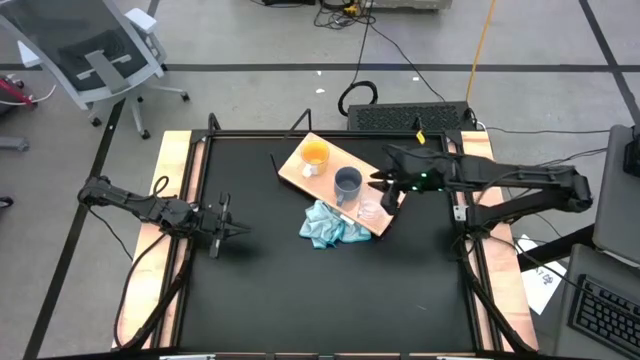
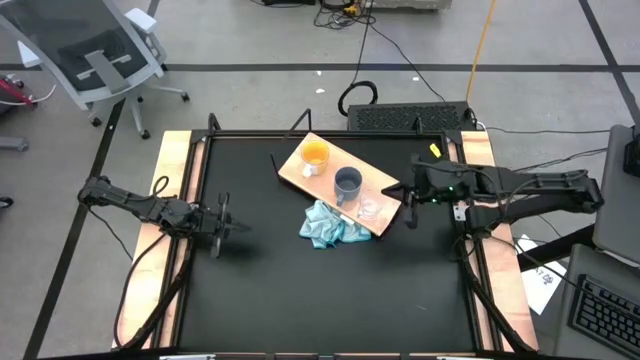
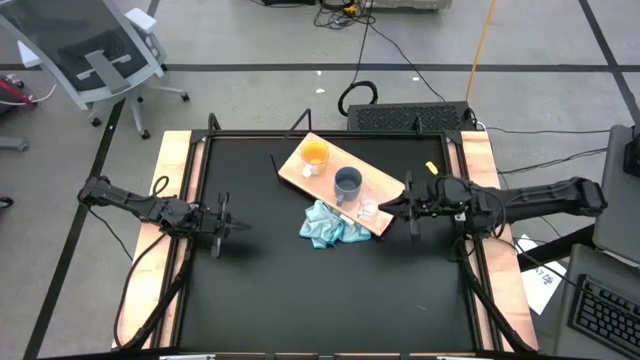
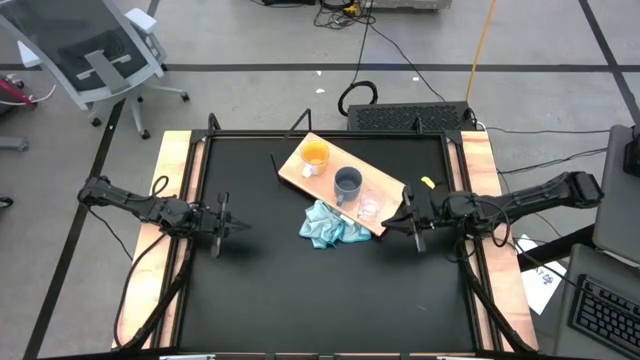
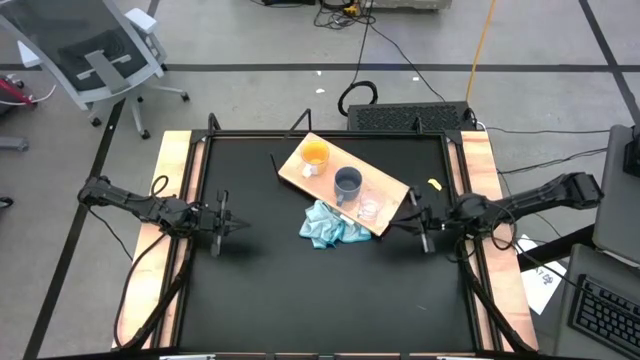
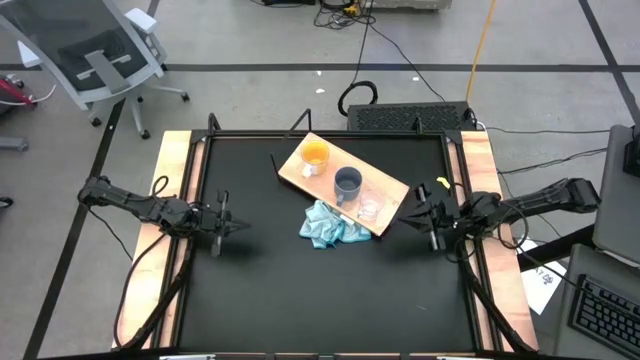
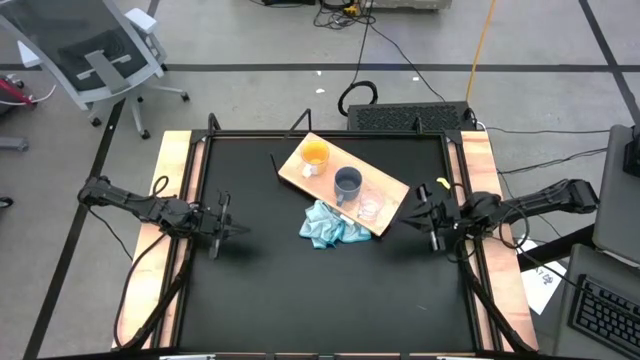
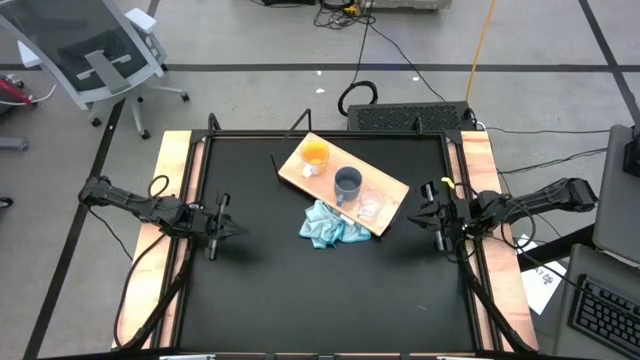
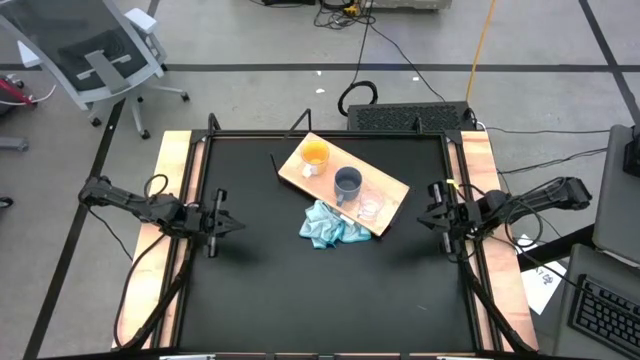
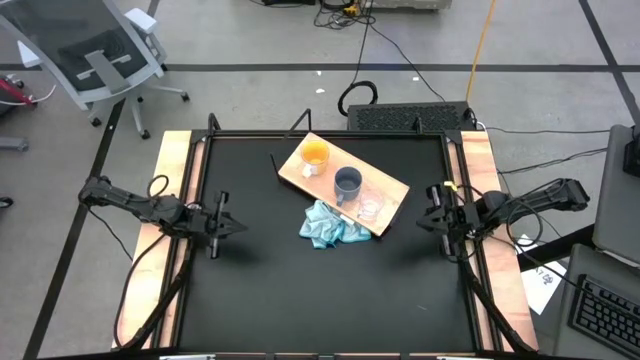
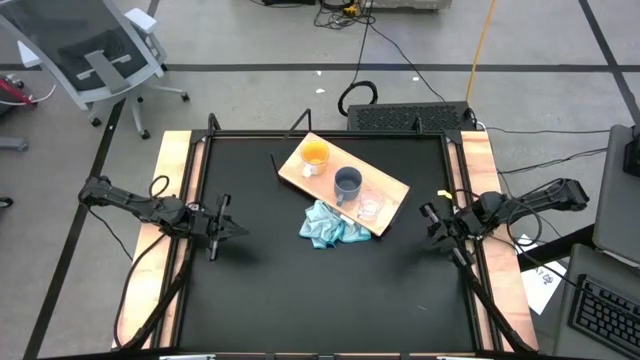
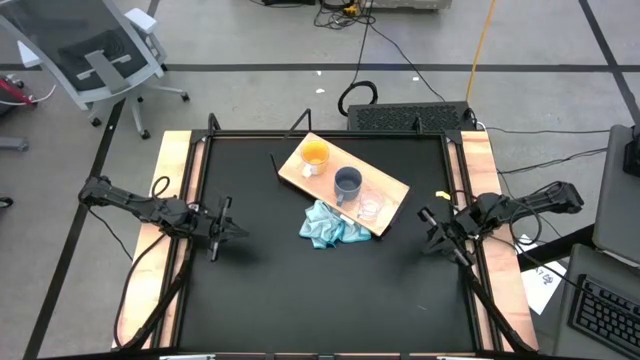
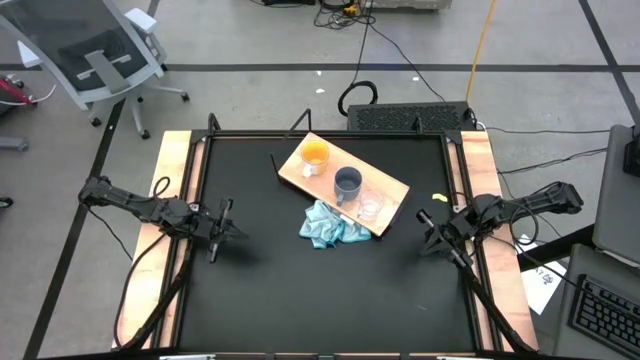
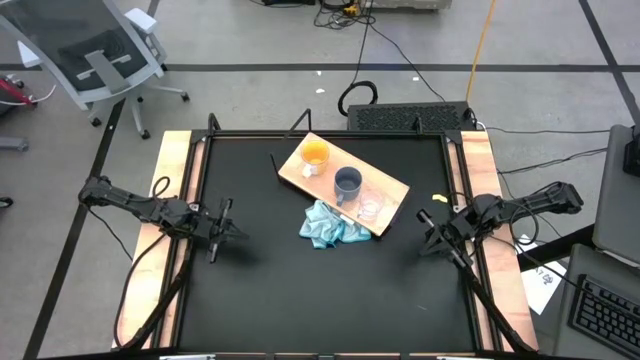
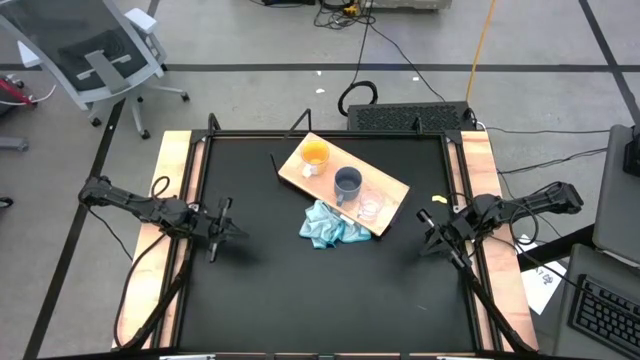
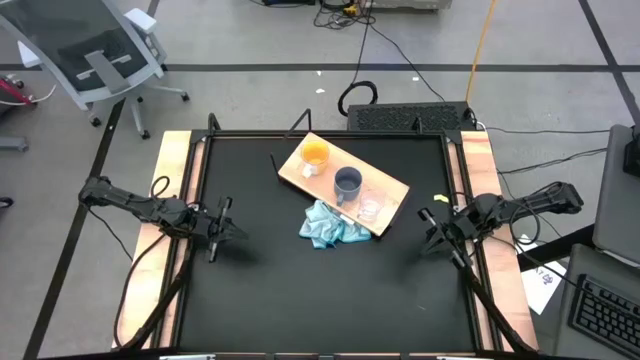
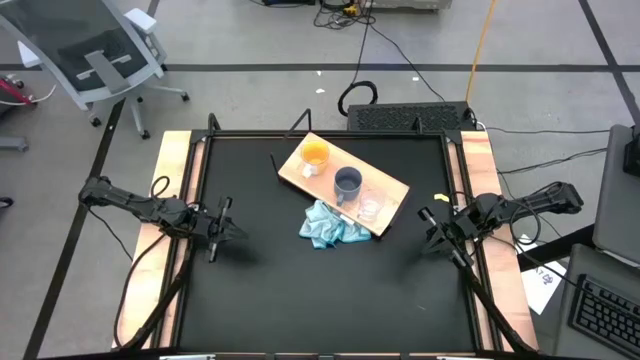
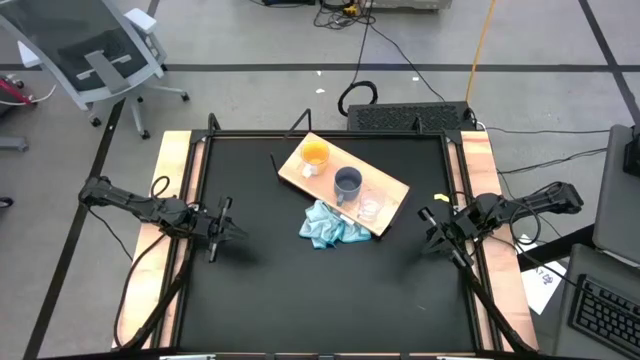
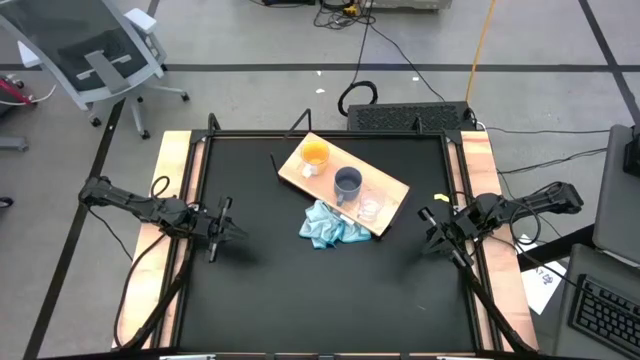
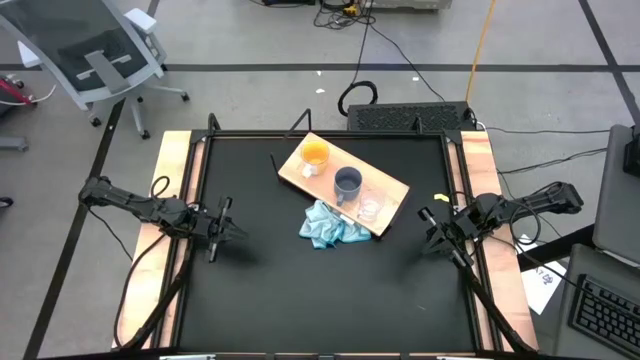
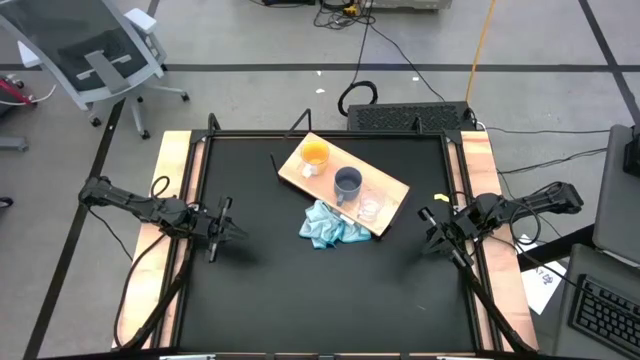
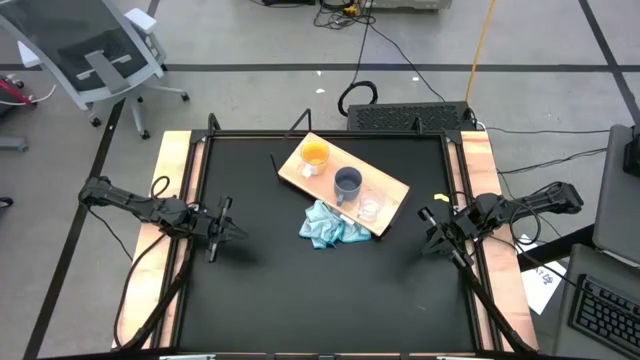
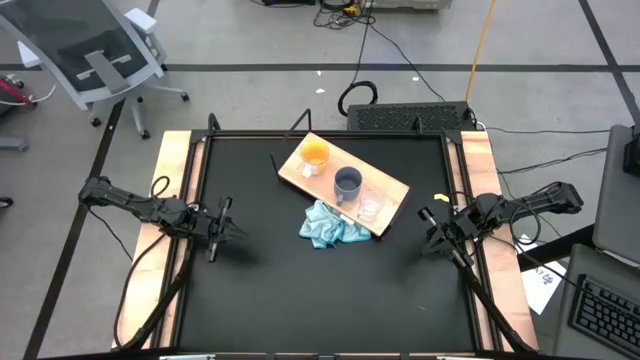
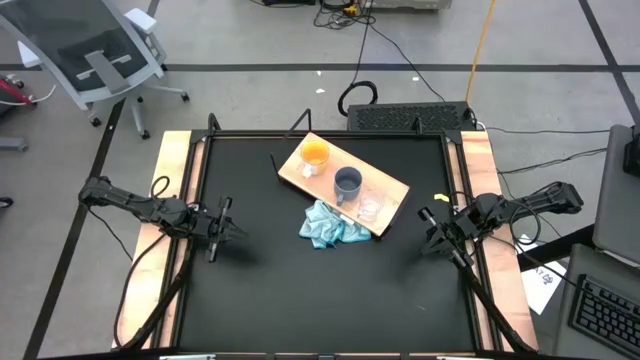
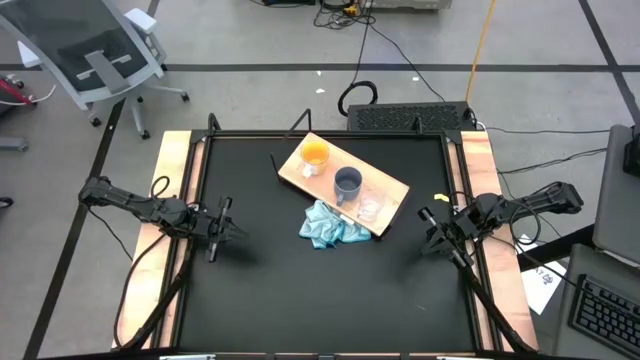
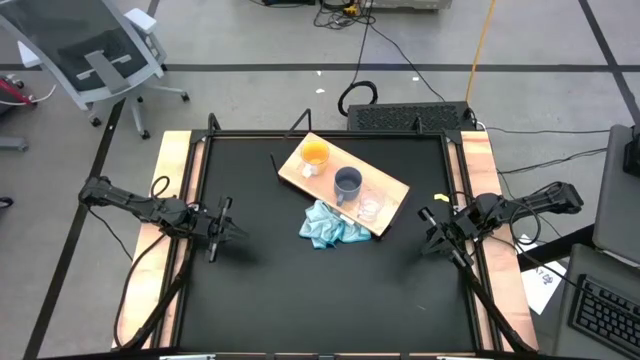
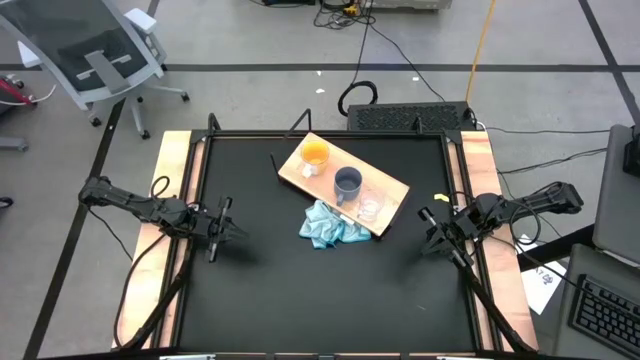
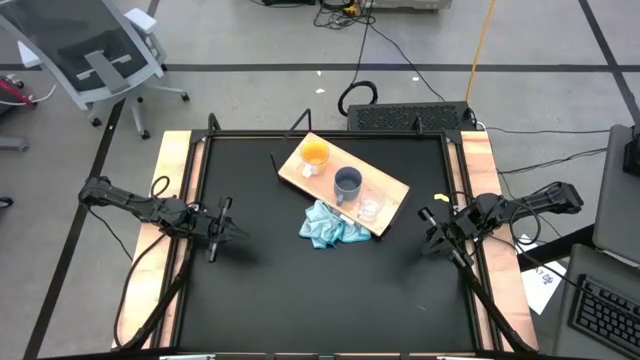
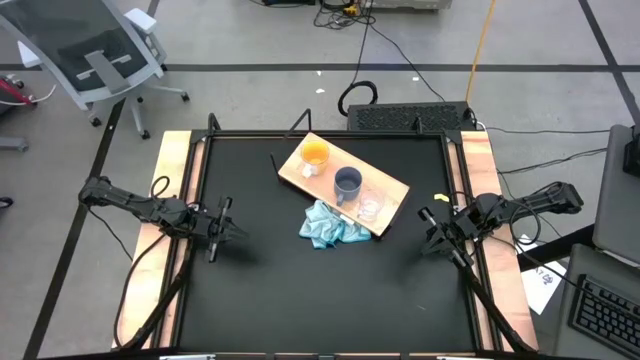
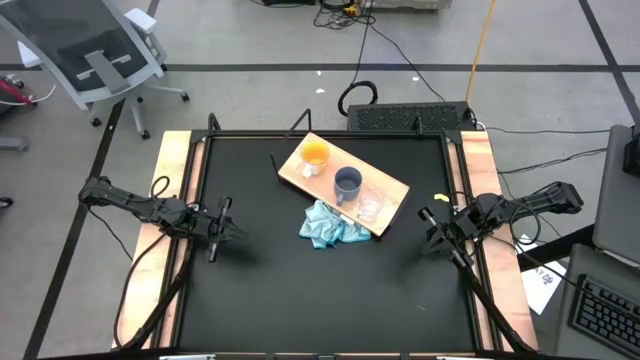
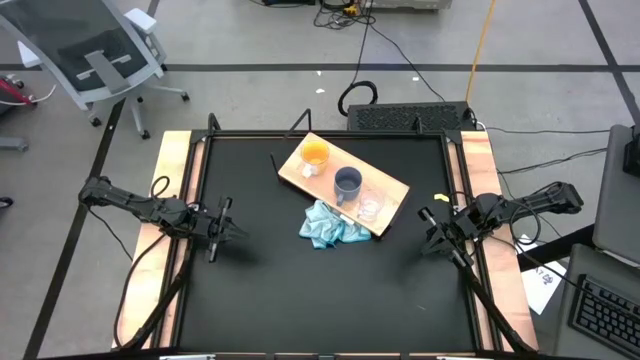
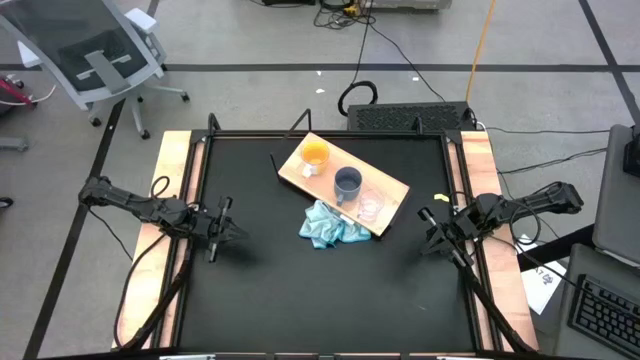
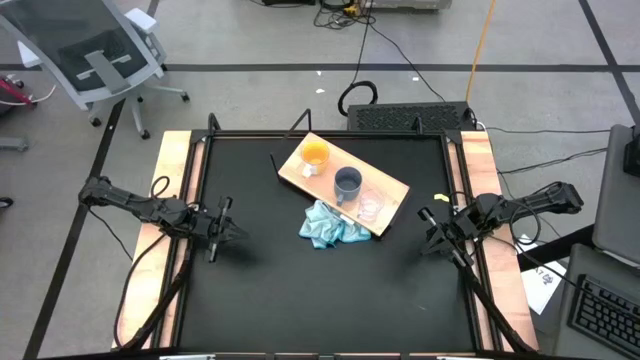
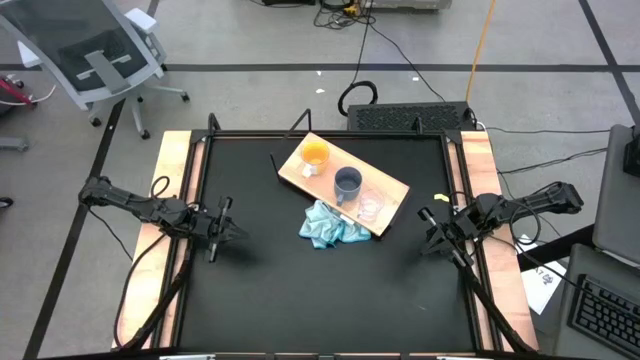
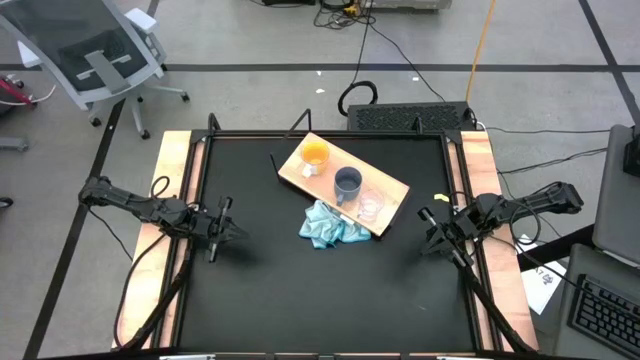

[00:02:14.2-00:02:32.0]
Task: Stack small to large cups/mugs on shelf
Return to Home Position
